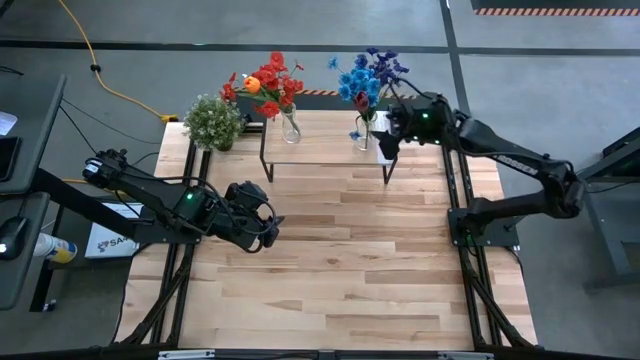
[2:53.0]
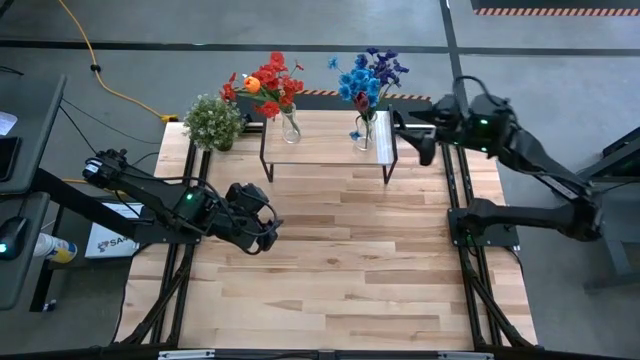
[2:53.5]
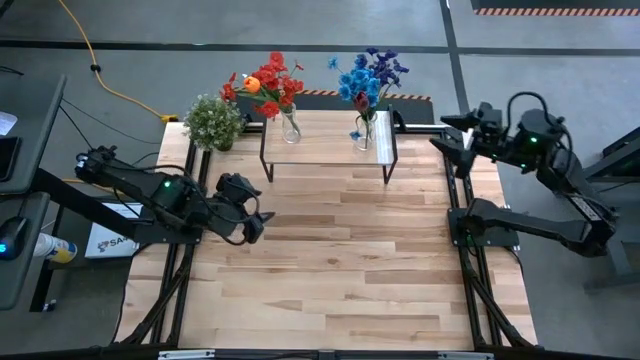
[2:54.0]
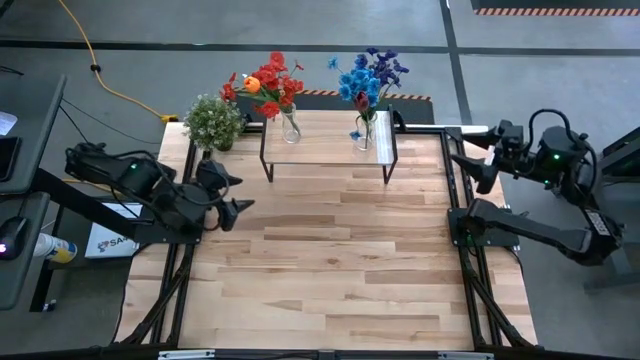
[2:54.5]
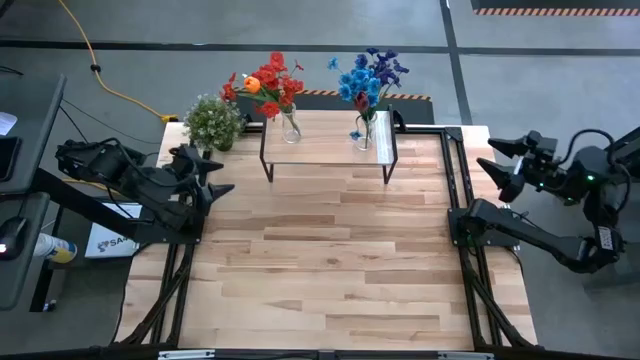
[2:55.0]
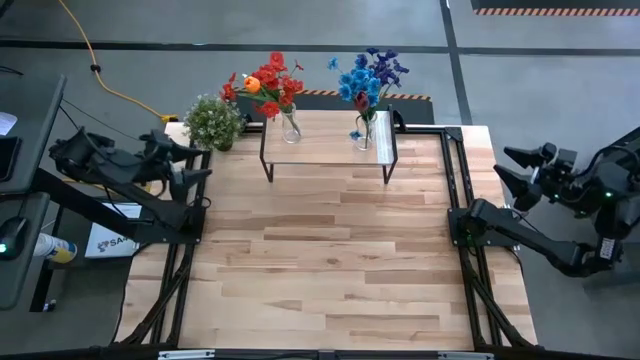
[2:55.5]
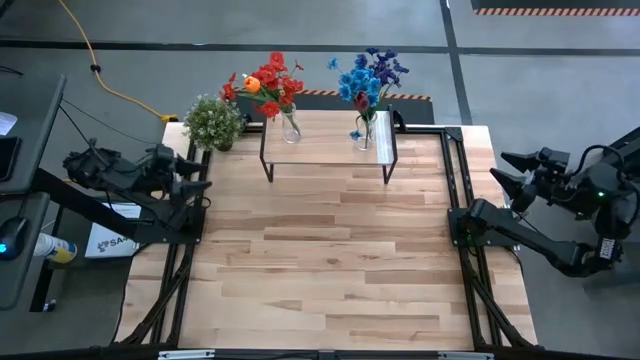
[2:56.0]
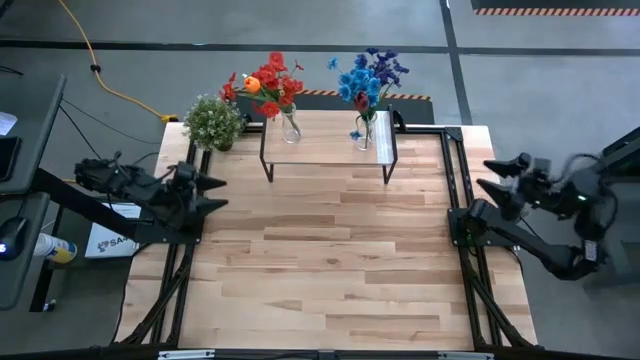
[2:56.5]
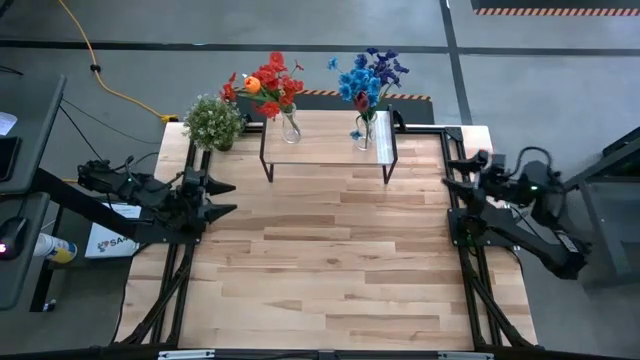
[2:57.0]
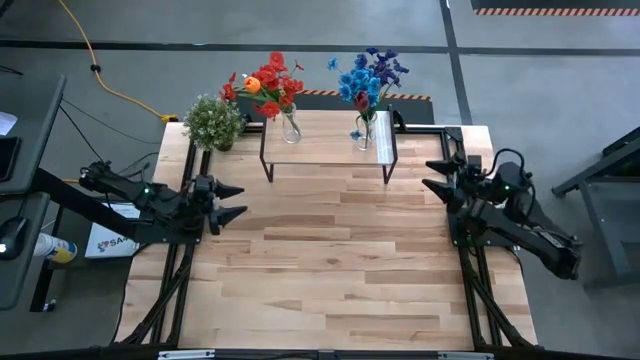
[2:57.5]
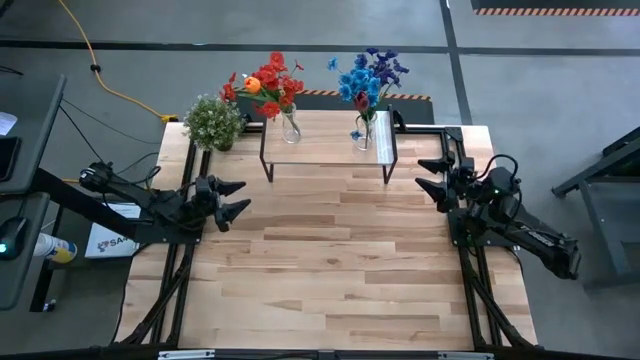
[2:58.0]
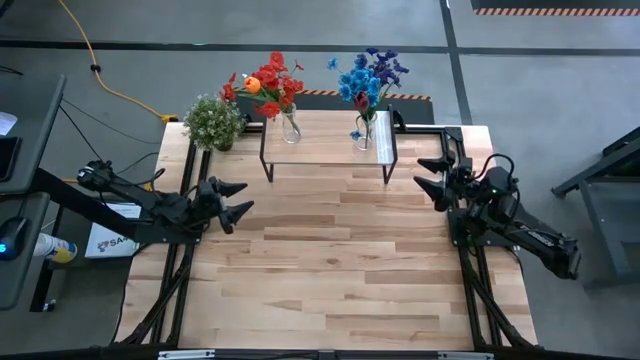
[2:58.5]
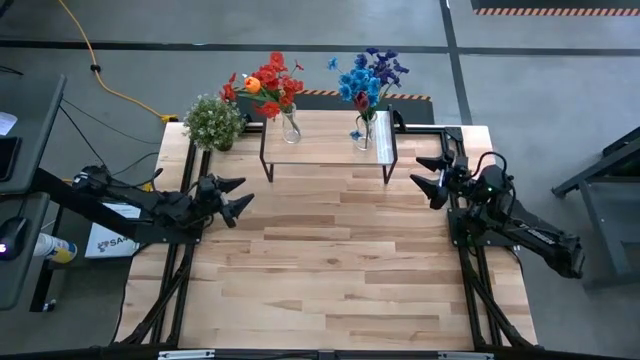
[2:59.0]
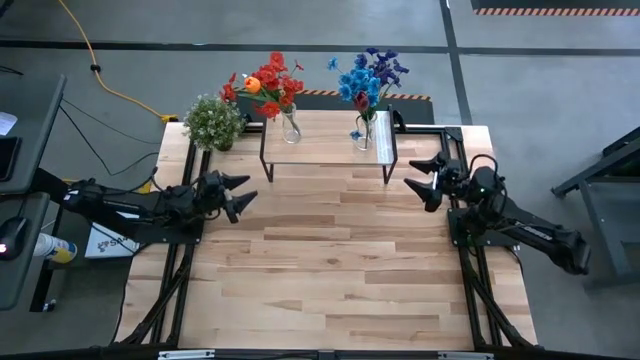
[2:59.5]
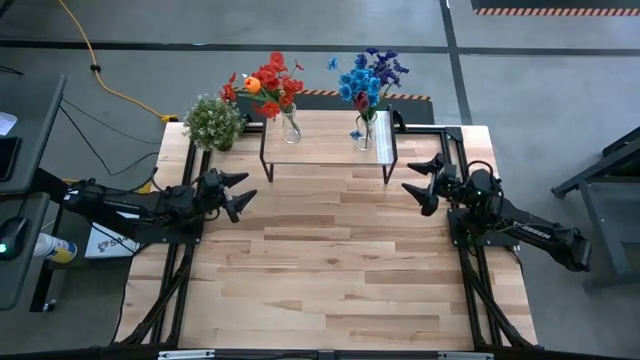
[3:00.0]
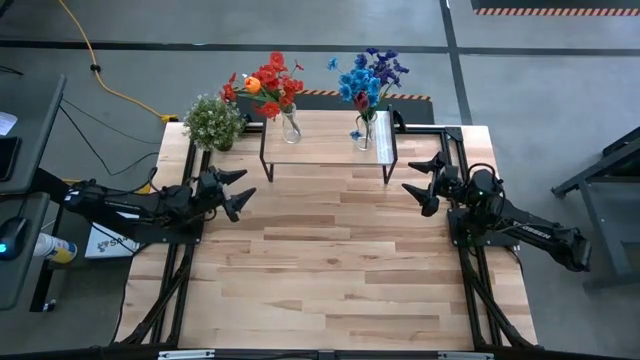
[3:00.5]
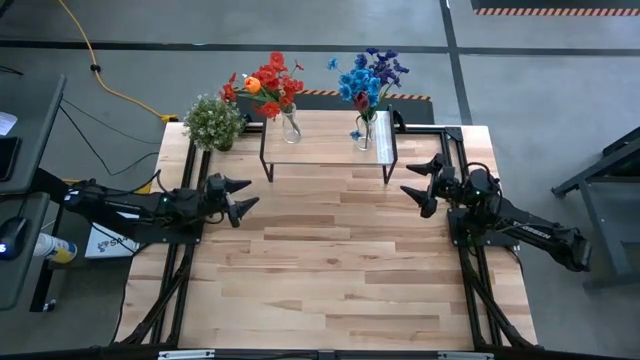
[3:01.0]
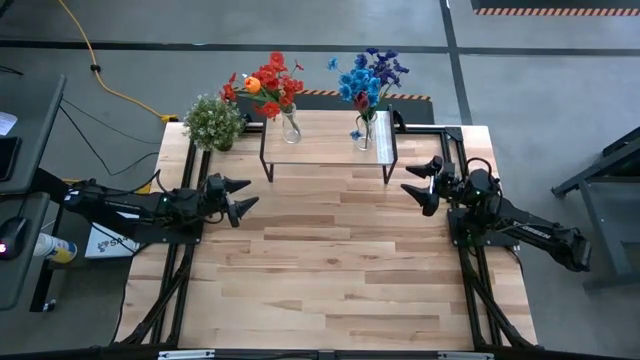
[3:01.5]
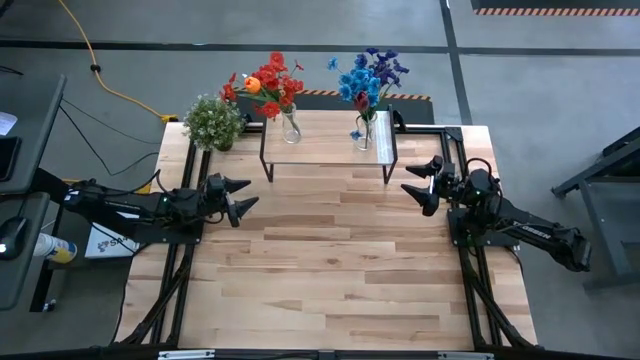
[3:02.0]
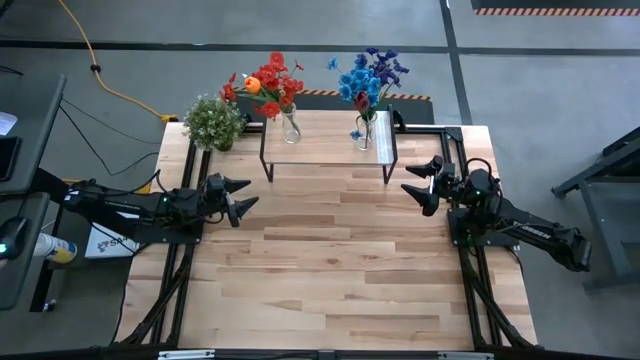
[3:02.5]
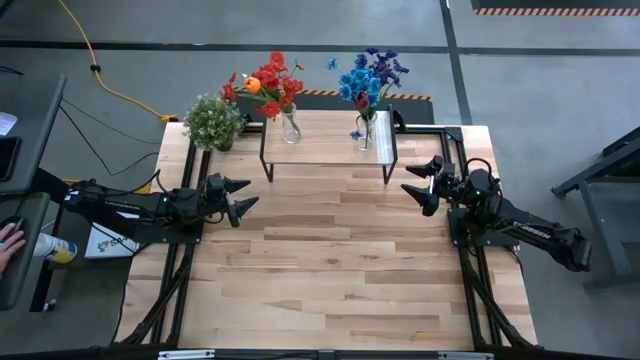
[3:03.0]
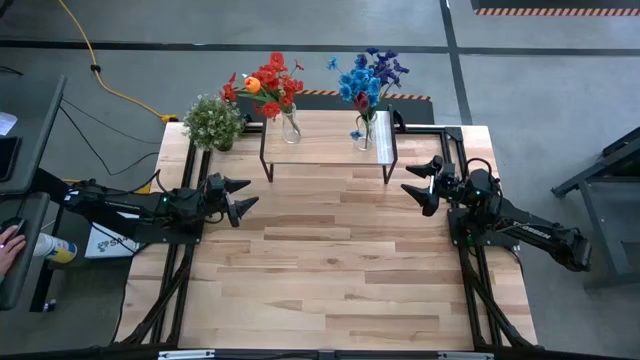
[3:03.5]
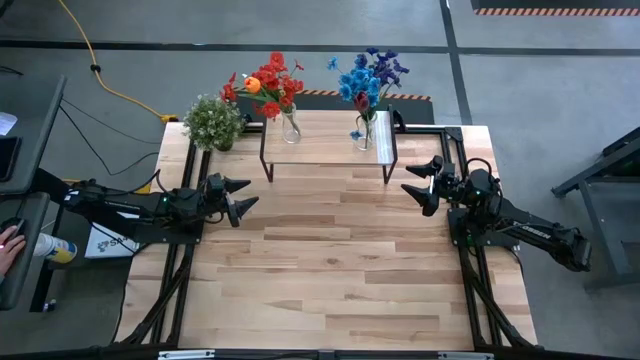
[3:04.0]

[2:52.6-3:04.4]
Task: Pick and place flowers into a vace then onto a shelf
Return to Home Position

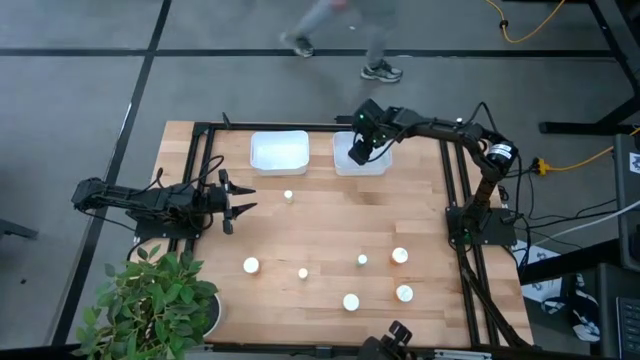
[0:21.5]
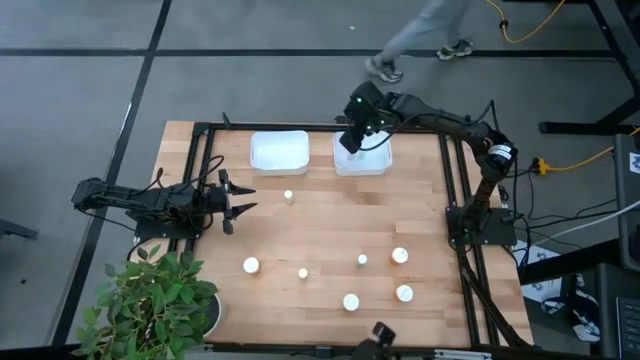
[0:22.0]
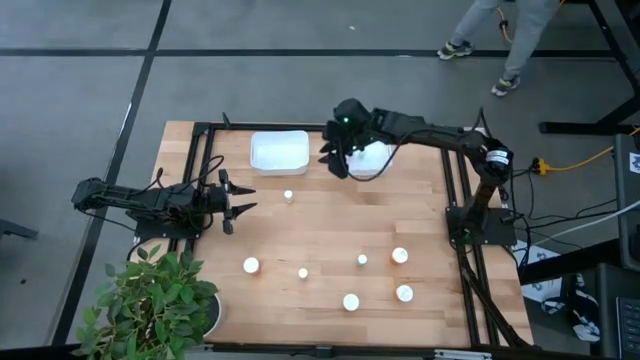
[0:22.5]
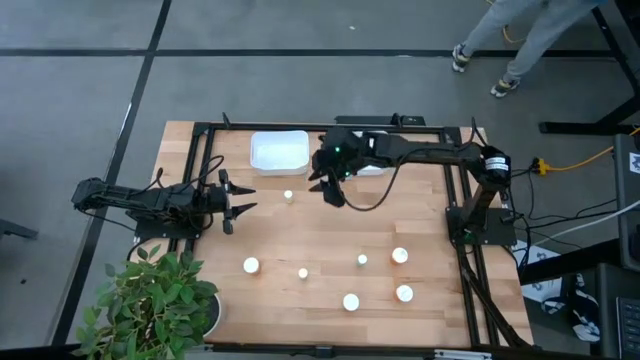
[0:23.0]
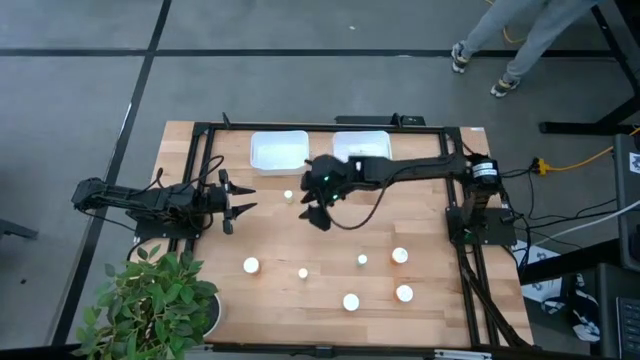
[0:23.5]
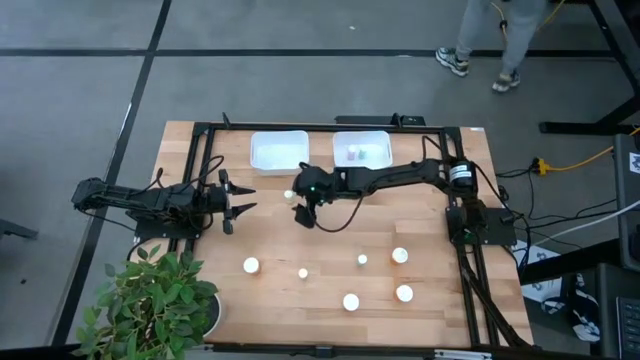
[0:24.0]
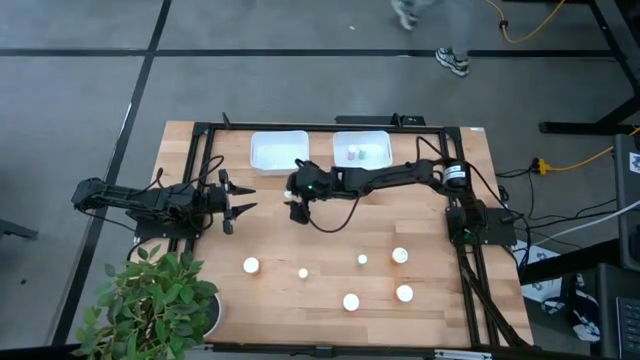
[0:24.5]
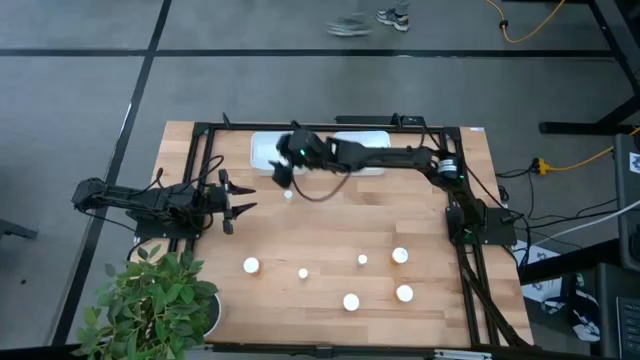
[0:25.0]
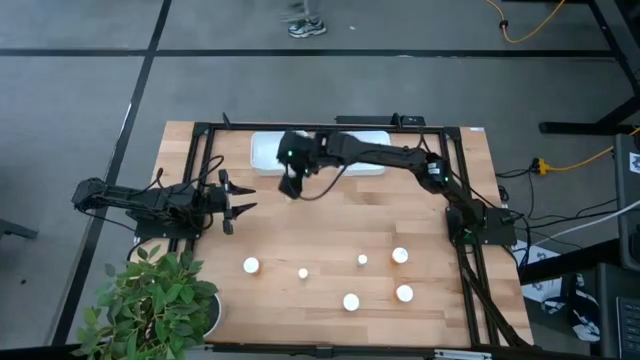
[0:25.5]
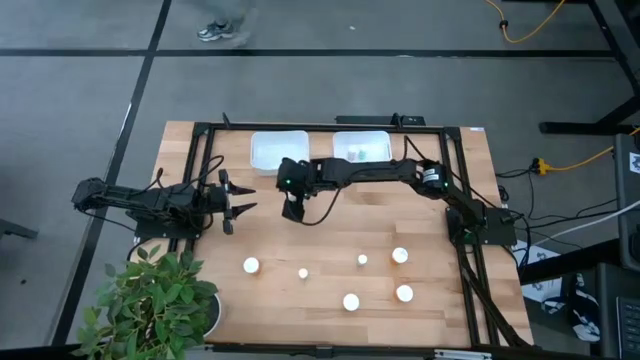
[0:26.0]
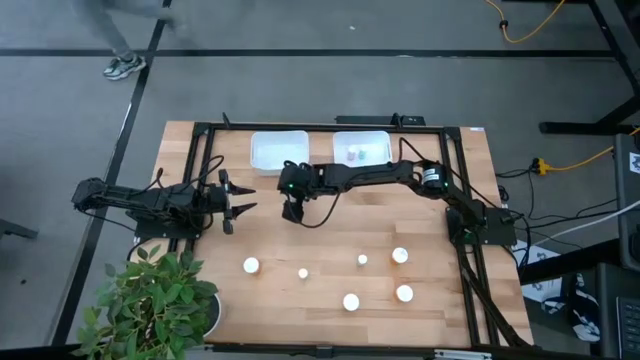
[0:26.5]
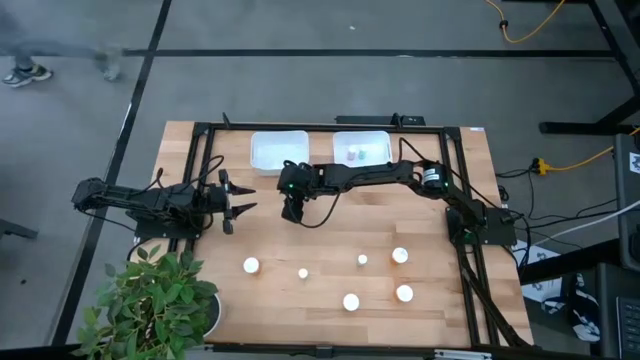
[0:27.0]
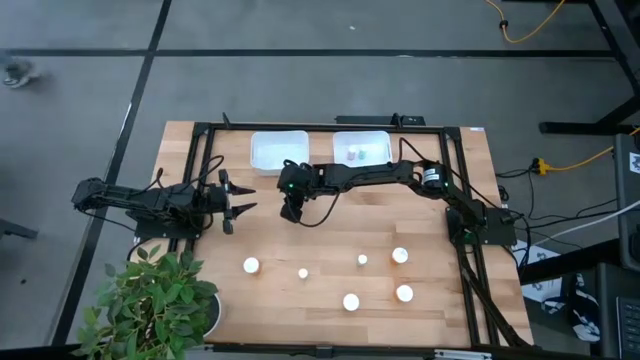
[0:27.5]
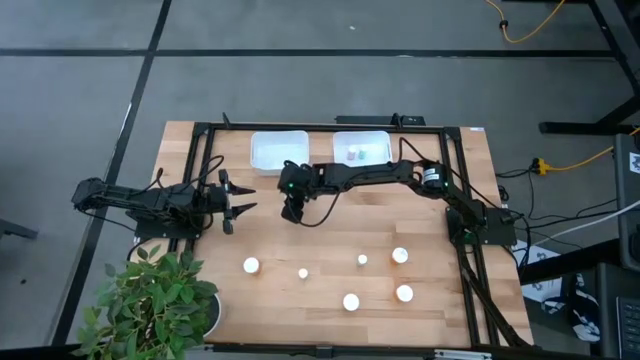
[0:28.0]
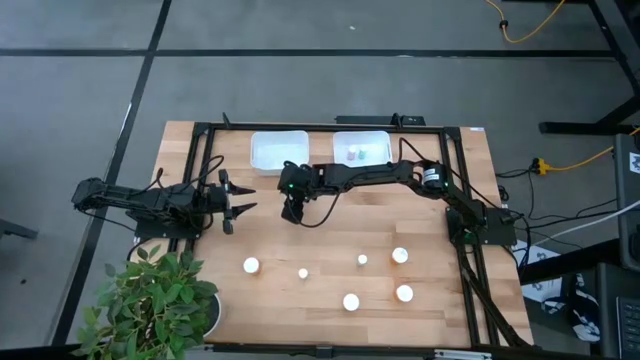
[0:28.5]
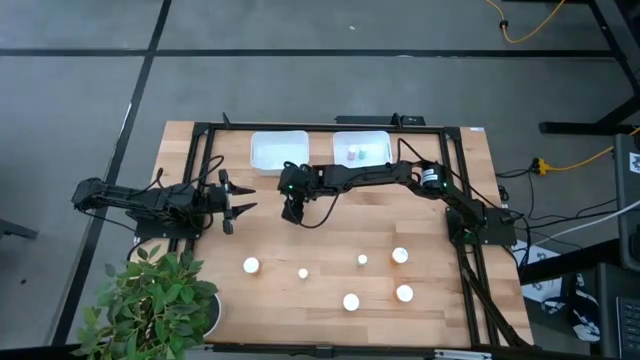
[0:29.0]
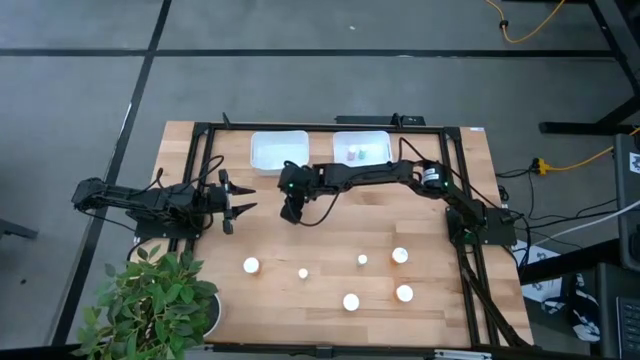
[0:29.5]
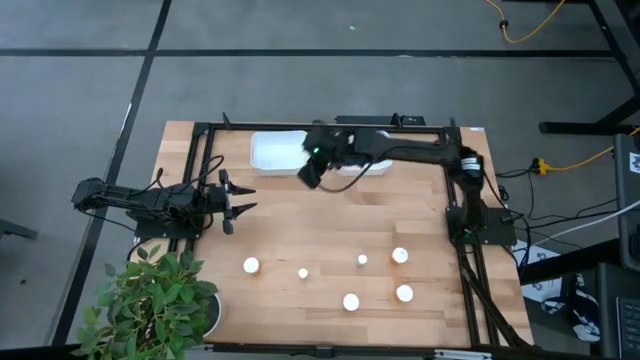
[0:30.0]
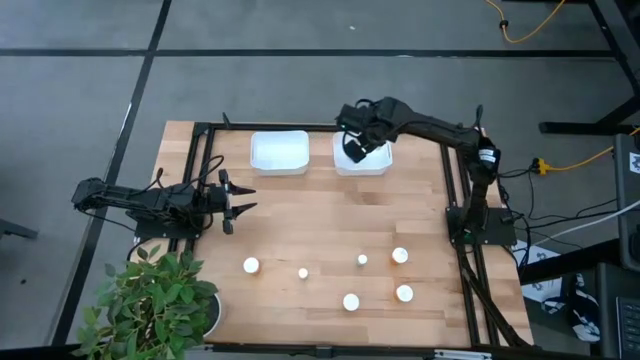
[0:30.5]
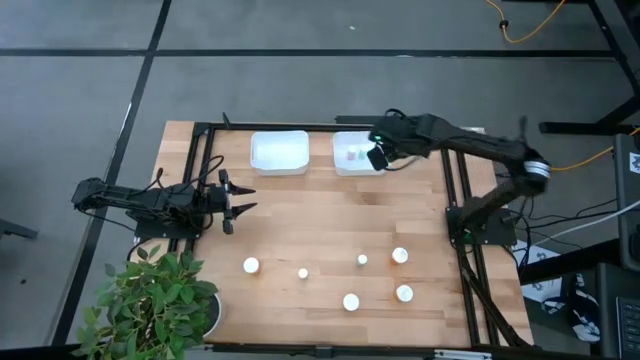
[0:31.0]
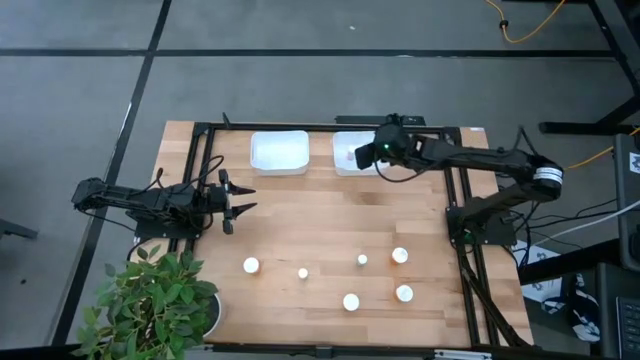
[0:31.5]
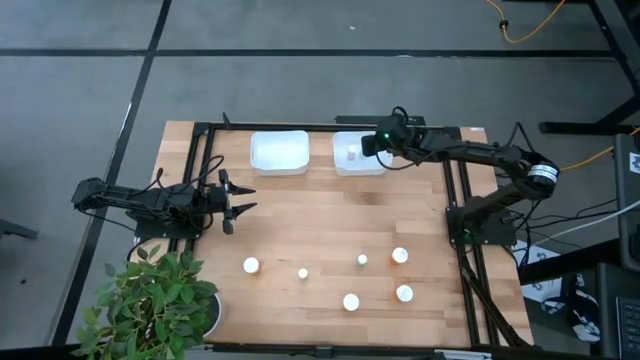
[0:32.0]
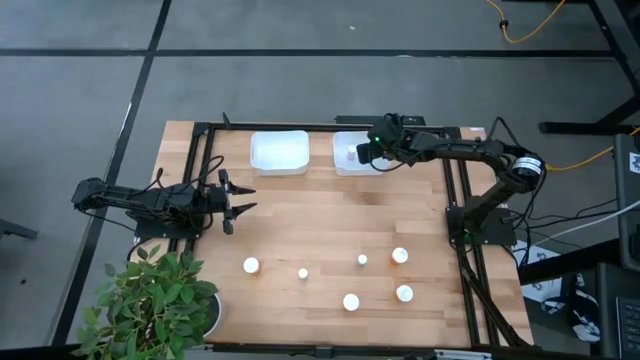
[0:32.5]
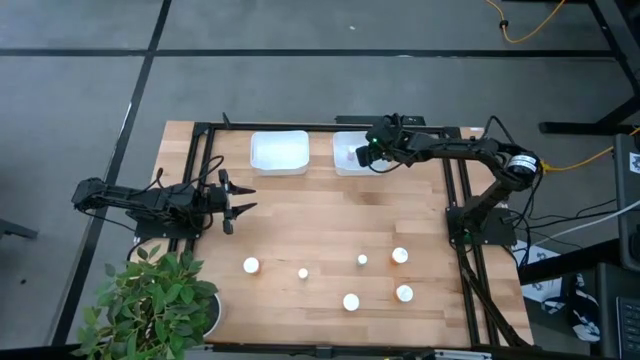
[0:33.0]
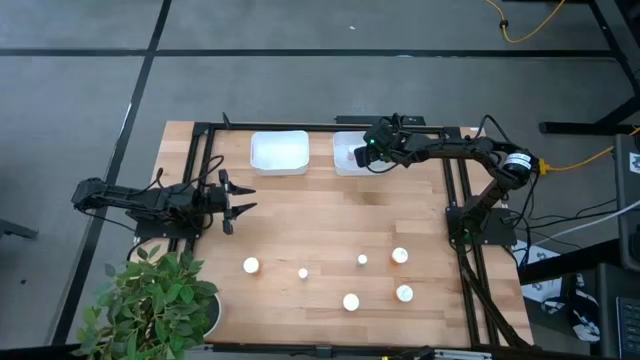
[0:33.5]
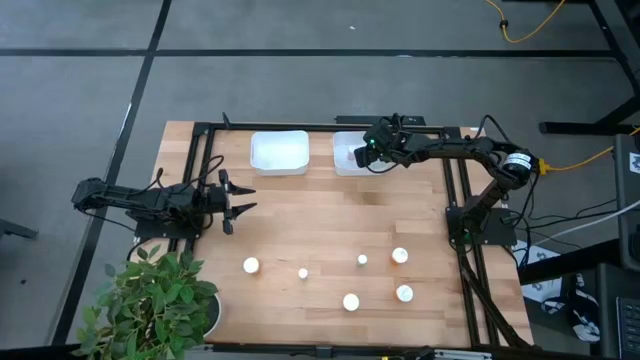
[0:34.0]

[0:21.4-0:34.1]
Task: Pick and place medicine bottles into bin by pill shape (circle, oval)
Put the yellow pill bottle into the right white bin
